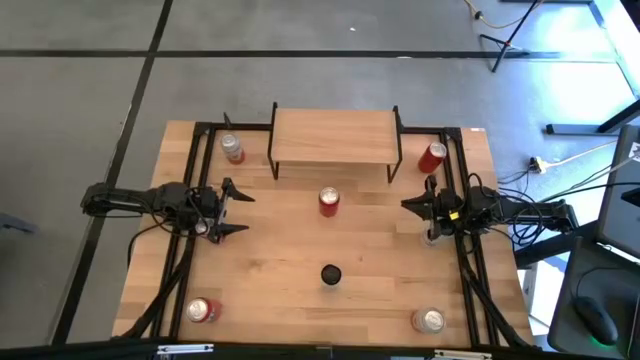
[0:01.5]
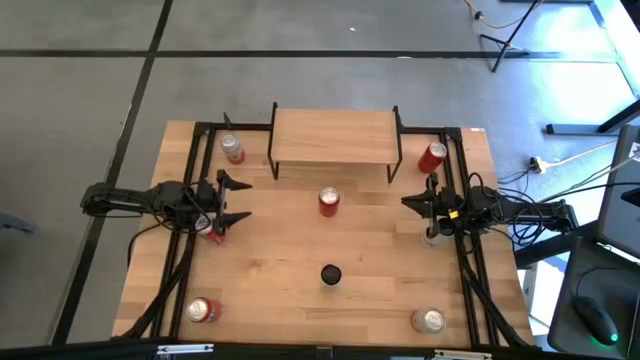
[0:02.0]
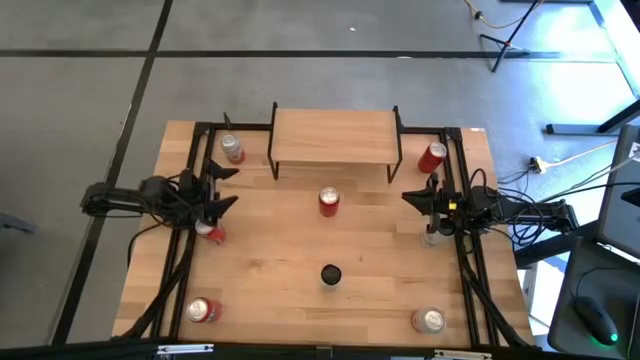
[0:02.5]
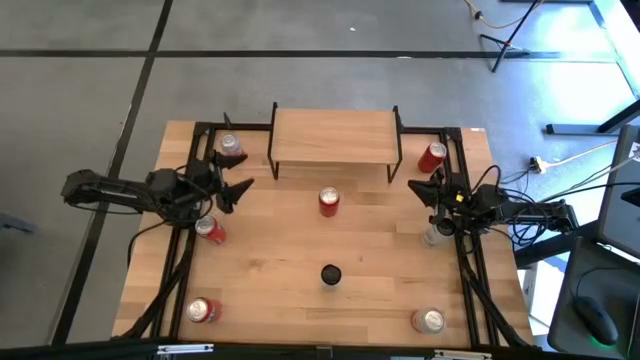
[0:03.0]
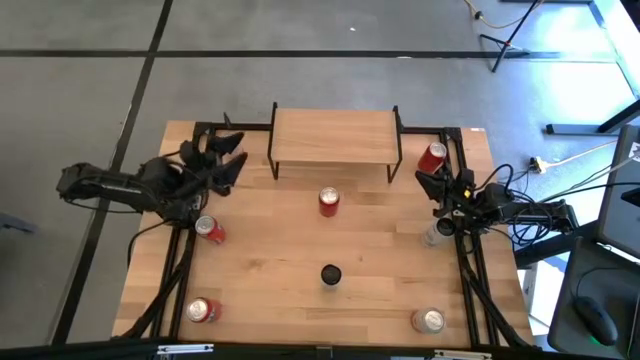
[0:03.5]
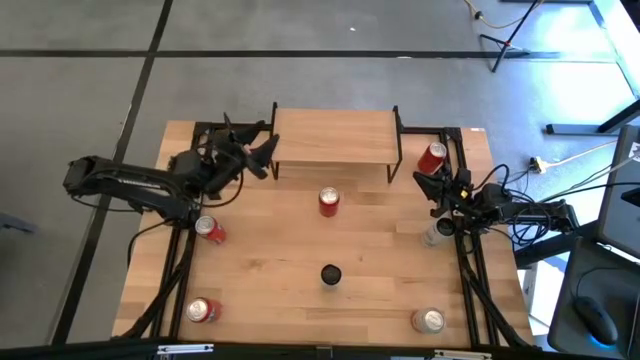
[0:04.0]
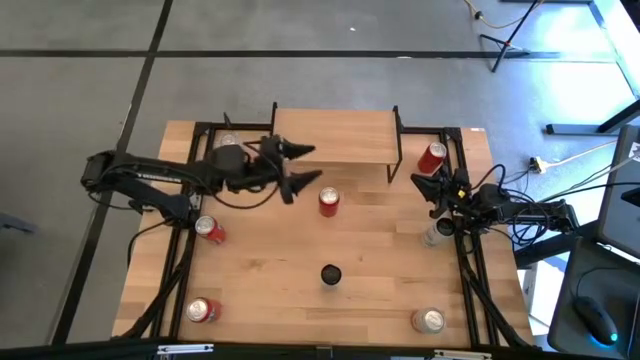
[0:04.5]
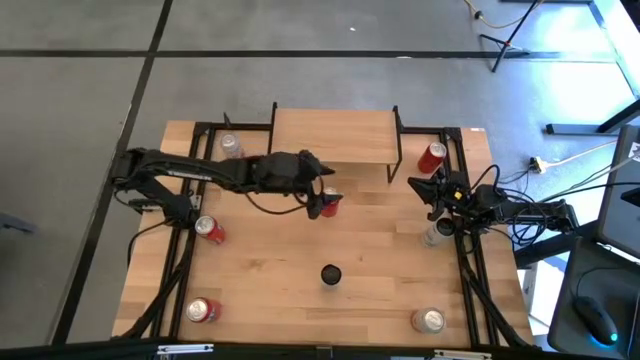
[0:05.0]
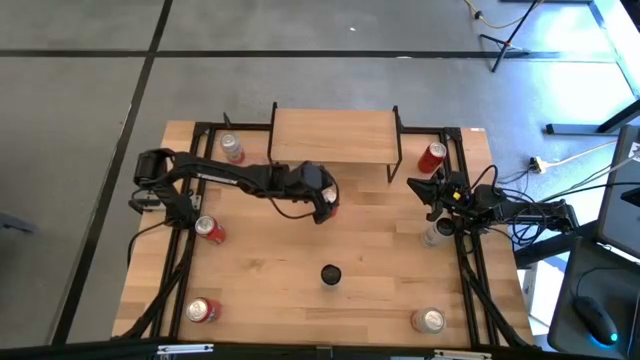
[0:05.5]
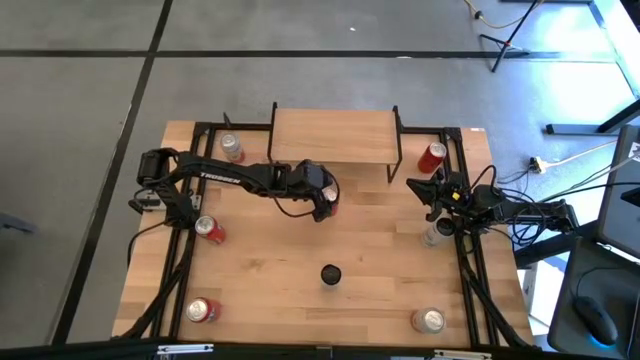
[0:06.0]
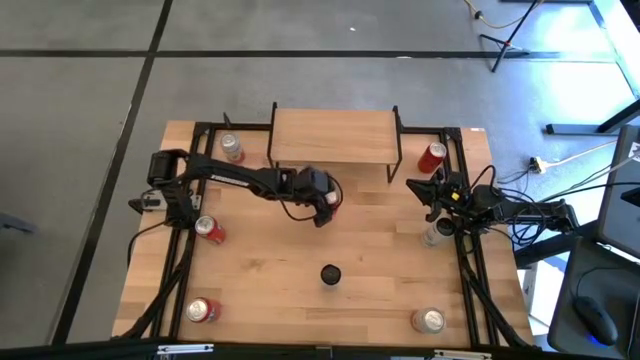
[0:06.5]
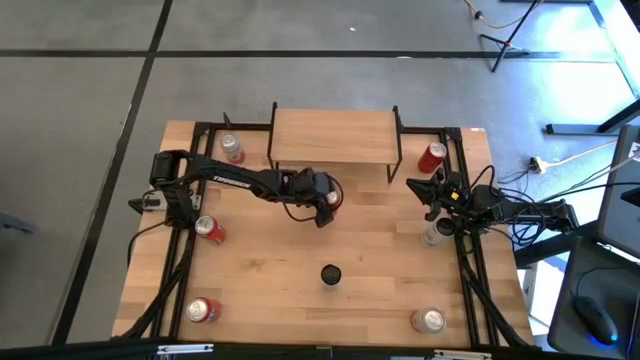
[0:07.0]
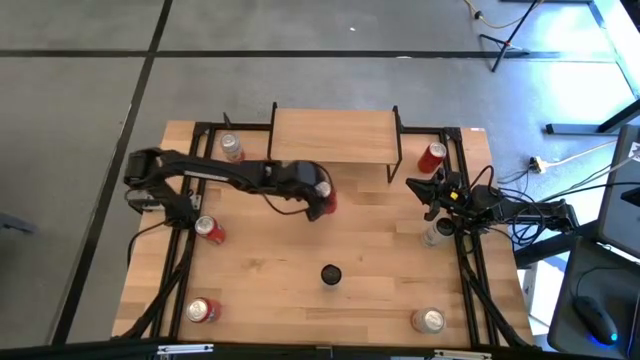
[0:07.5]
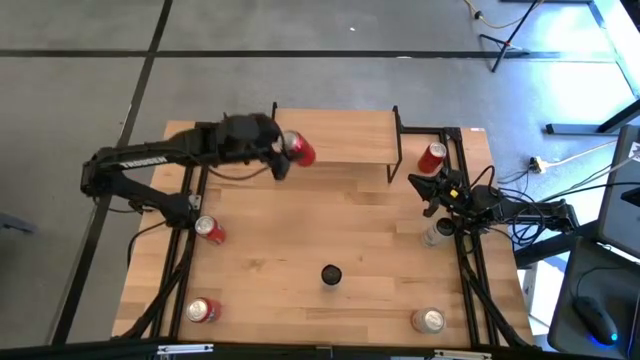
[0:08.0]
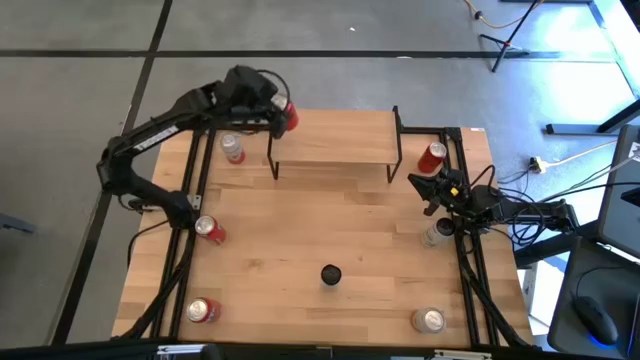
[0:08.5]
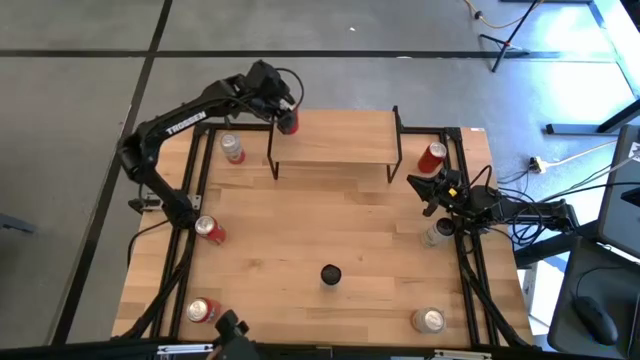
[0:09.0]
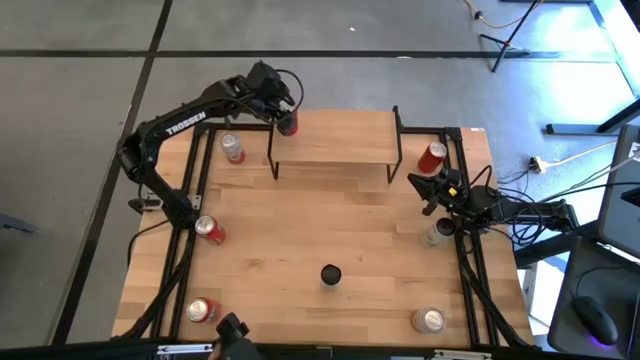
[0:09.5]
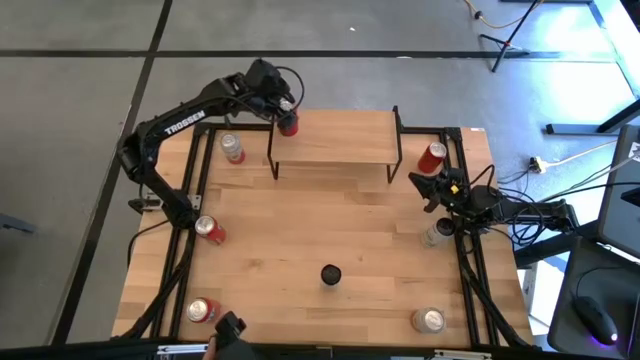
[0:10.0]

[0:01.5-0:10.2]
Task: Place canned beverage on shelf
Put the left red and black soda can on the shelf

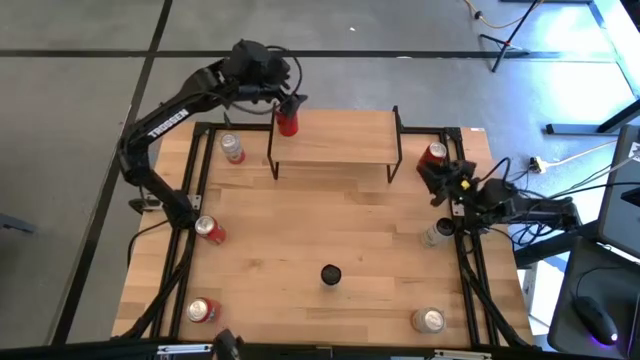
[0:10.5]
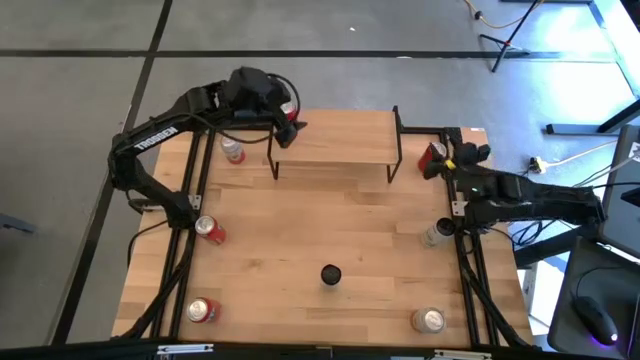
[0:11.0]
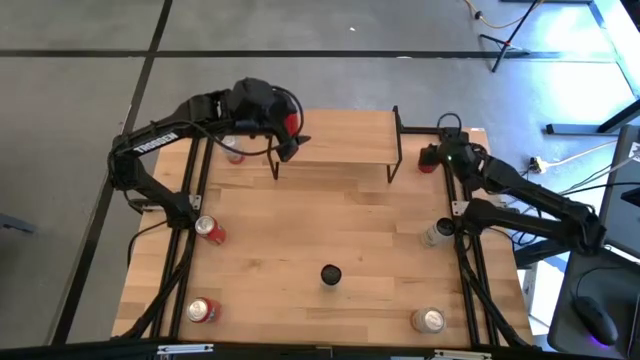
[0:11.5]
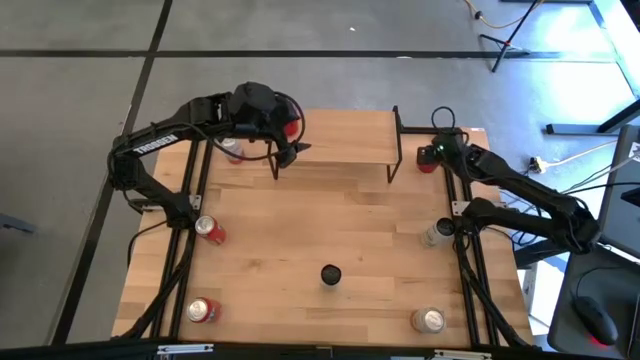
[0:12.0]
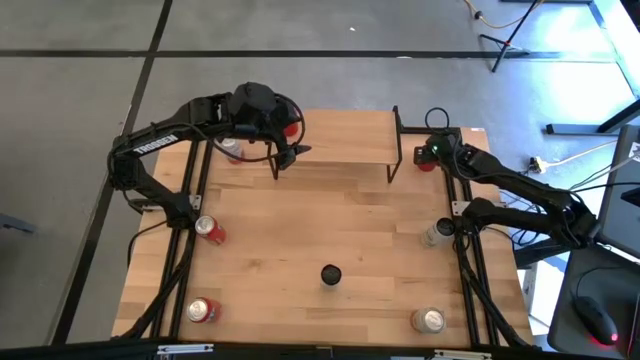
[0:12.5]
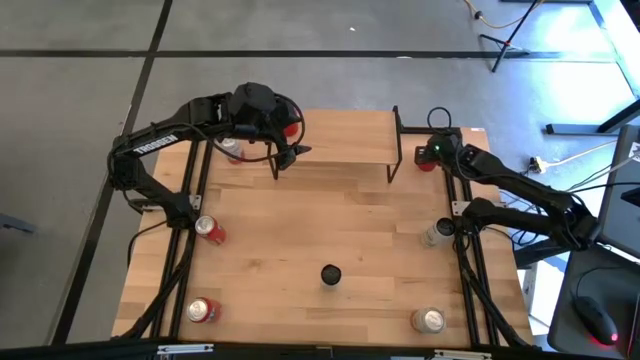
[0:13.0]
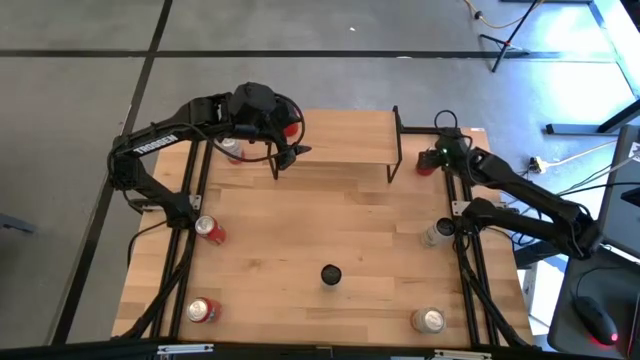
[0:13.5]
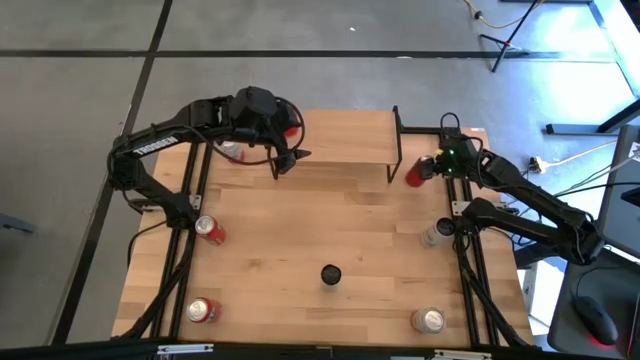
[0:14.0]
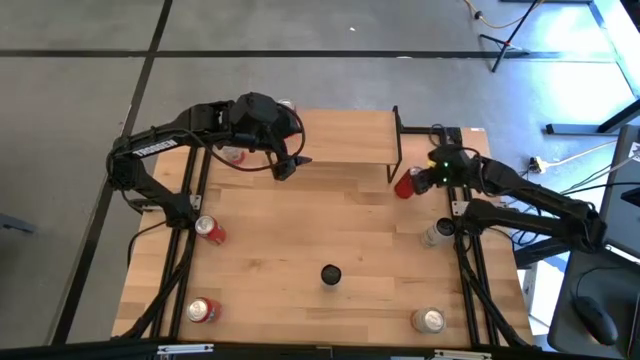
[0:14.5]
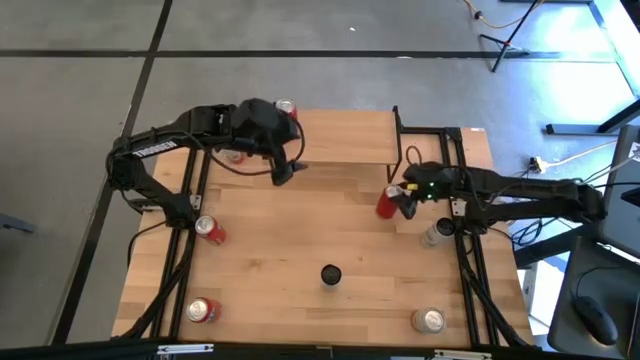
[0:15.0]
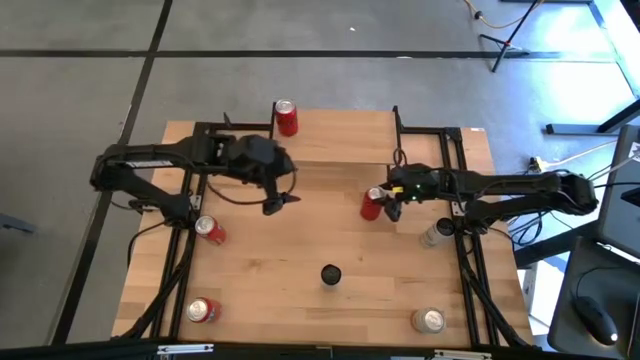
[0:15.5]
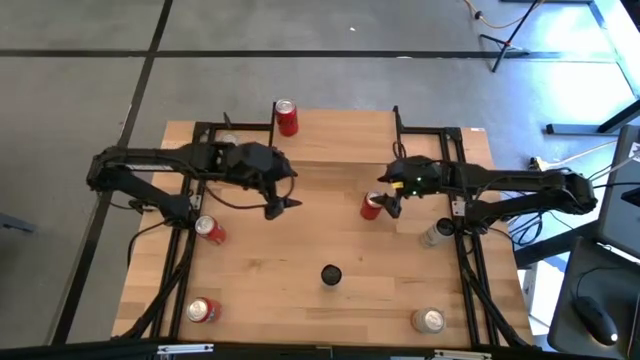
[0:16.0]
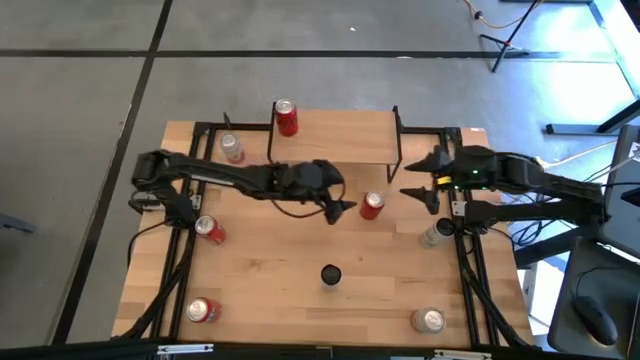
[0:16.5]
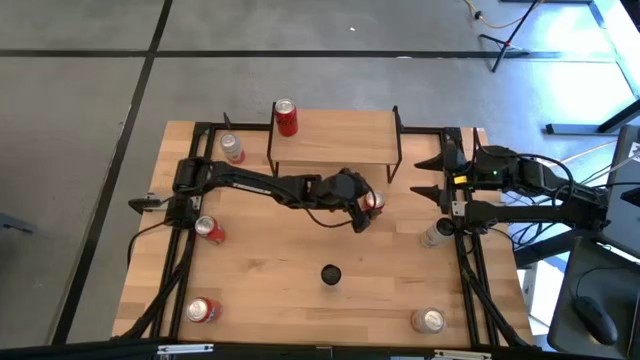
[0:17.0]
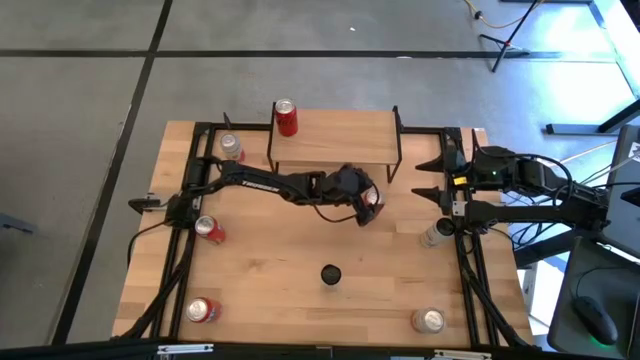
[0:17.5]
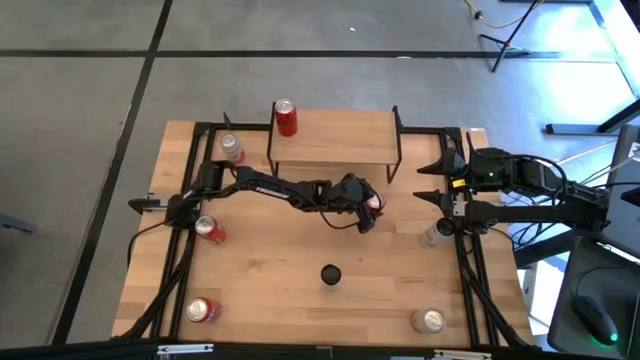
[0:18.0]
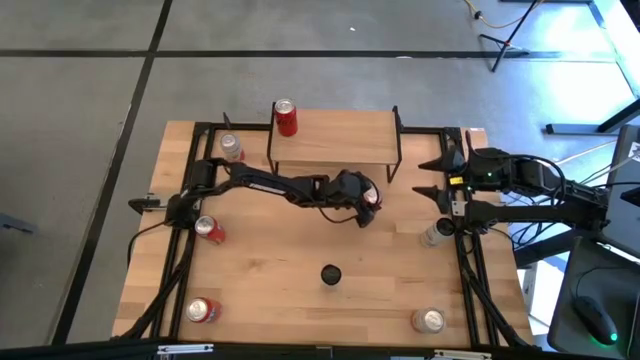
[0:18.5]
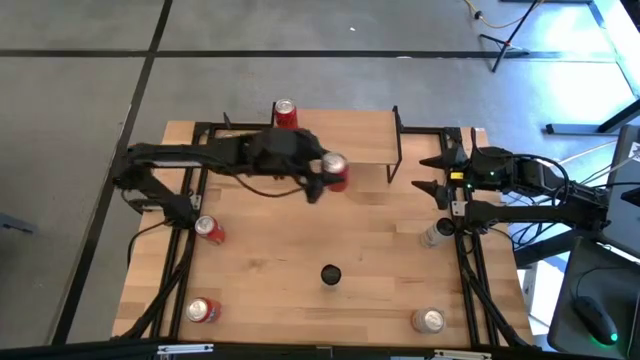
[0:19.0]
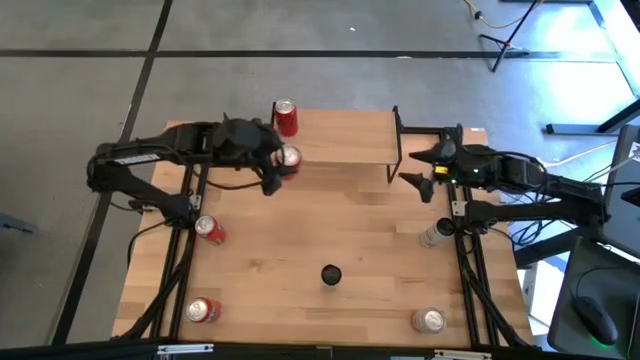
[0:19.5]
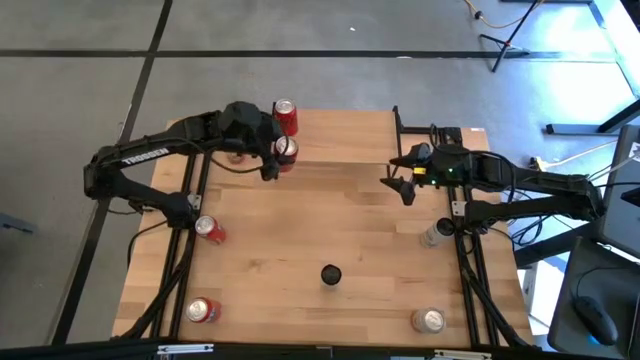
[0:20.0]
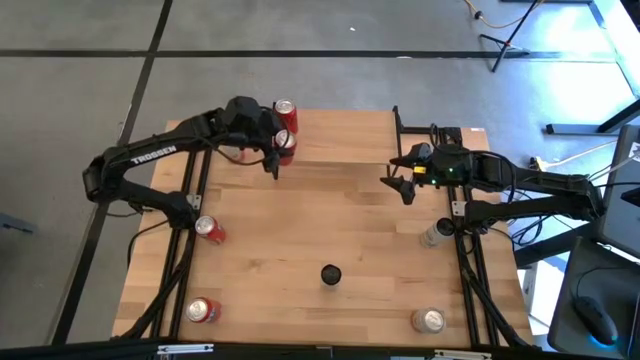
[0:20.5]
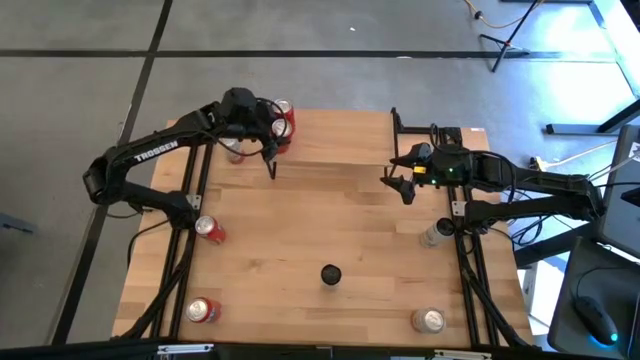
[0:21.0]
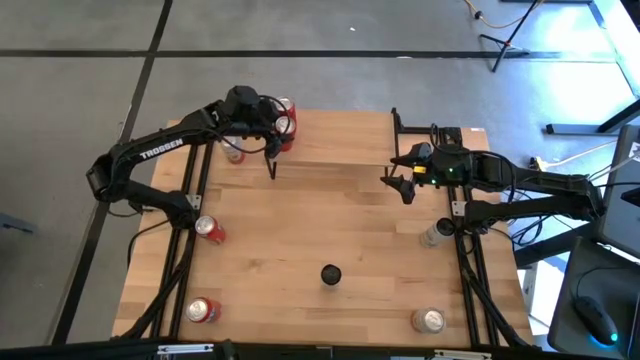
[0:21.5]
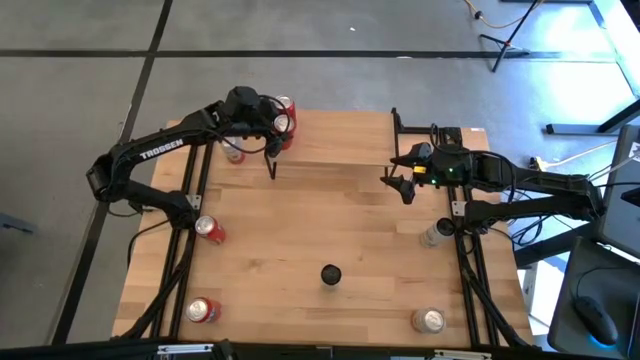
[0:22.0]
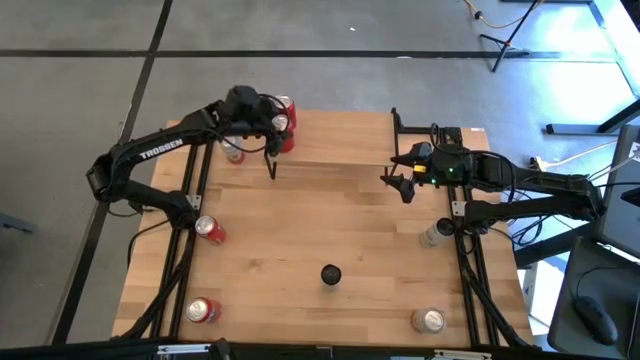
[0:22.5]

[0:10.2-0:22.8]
Put the red and black soda can on the shelf aligned with the other red and black soda can
